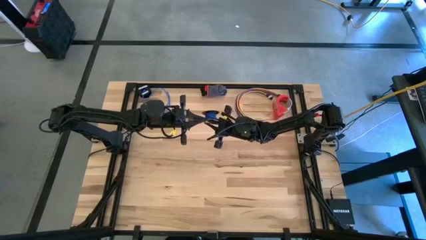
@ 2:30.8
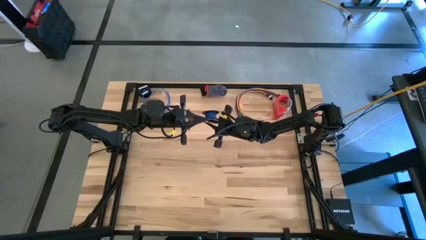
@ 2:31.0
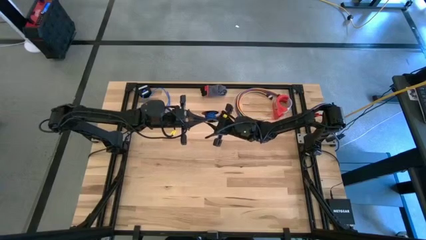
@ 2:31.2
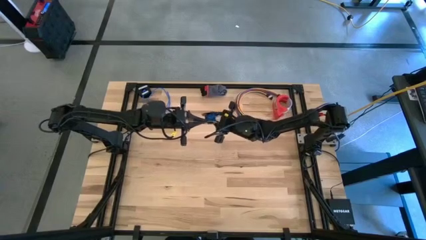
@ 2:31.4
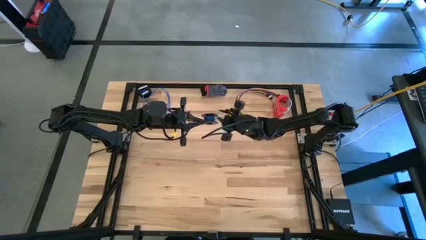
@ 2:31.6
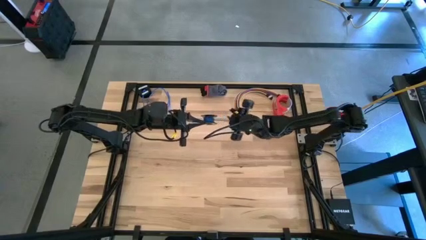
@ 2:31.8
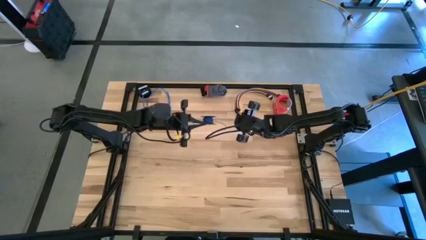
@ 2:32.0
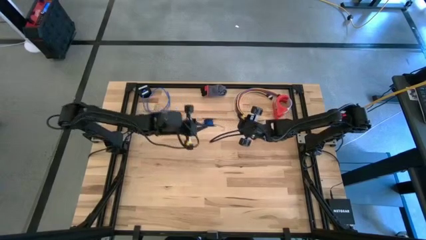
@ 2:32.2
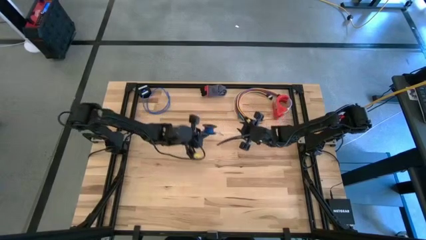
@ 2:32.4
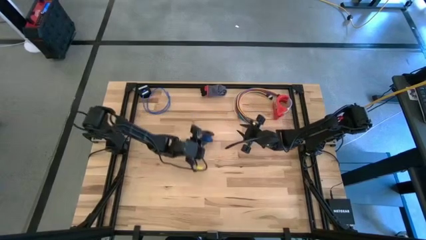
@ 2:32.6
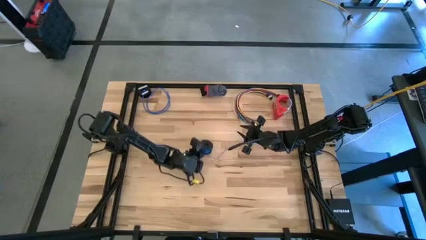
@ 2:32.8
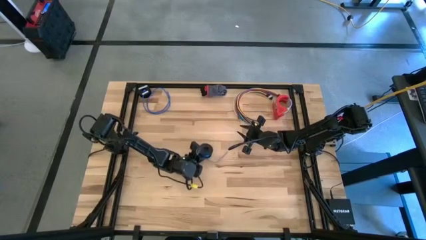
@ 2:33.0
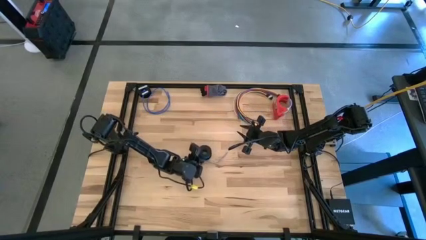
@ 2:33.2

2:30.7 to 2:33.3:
Task: Coil cords
Put the spool with the blue wire on the table

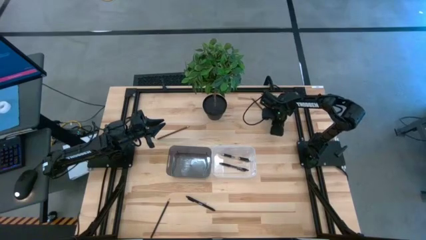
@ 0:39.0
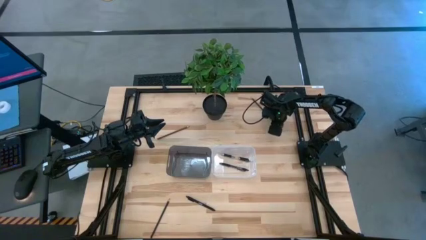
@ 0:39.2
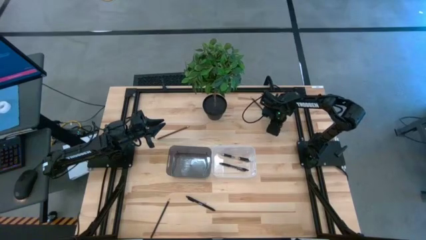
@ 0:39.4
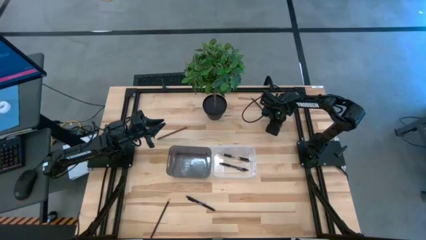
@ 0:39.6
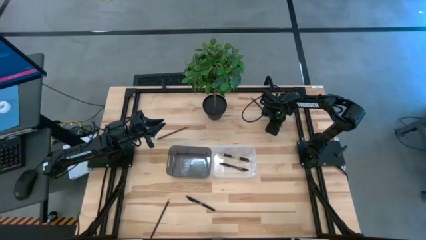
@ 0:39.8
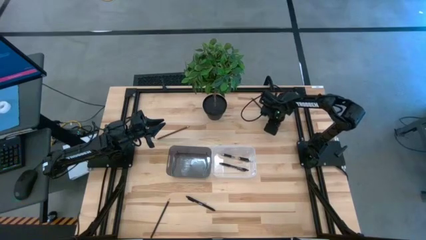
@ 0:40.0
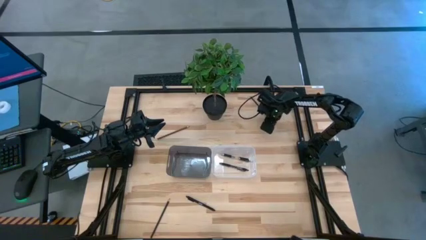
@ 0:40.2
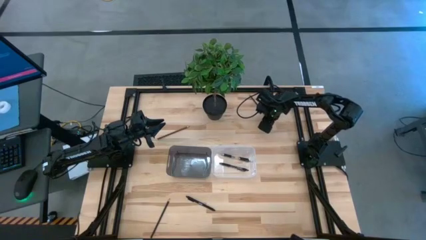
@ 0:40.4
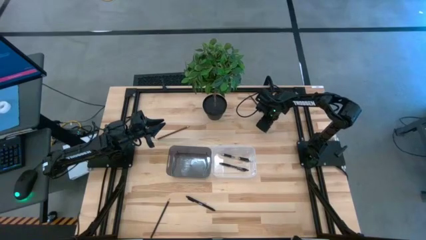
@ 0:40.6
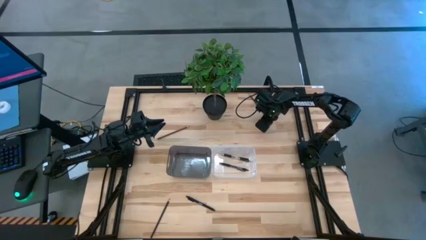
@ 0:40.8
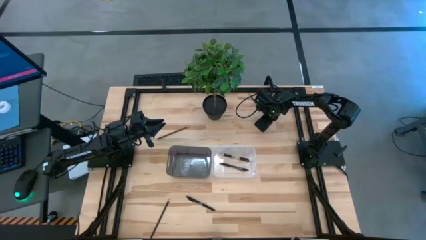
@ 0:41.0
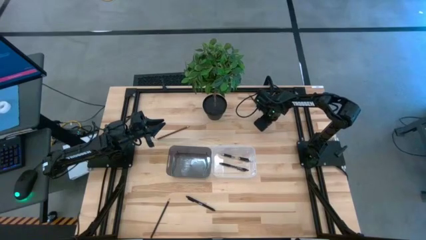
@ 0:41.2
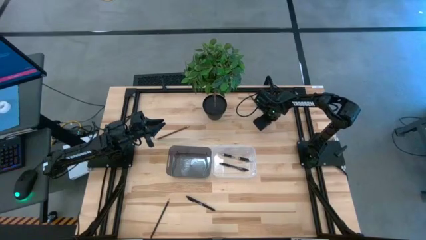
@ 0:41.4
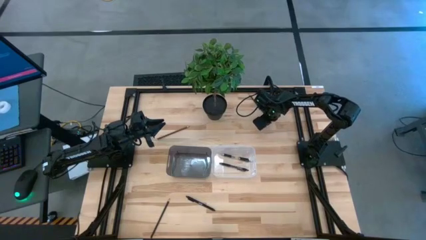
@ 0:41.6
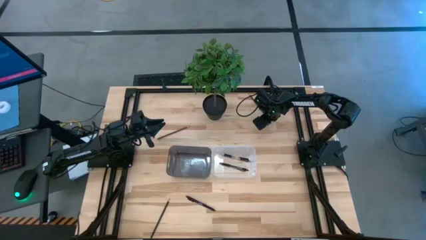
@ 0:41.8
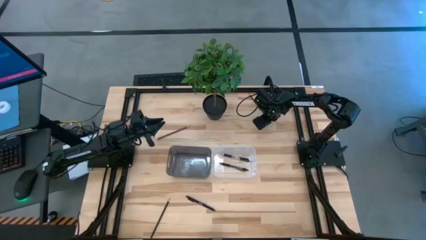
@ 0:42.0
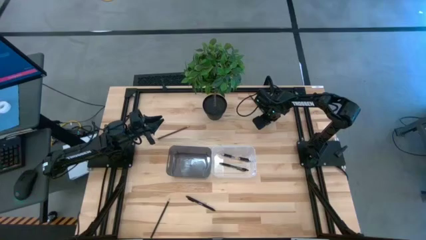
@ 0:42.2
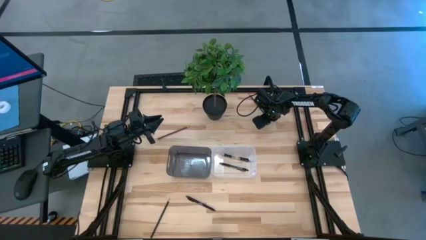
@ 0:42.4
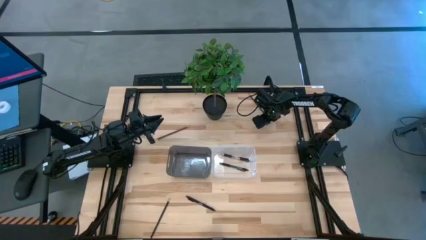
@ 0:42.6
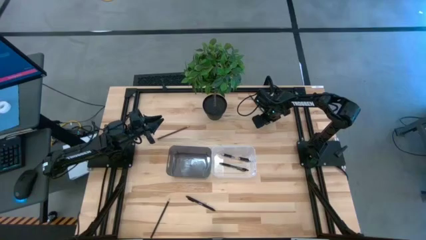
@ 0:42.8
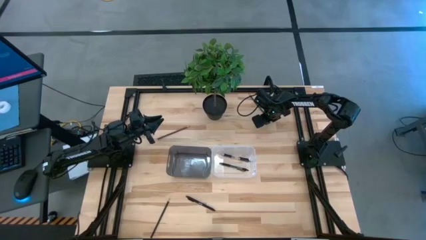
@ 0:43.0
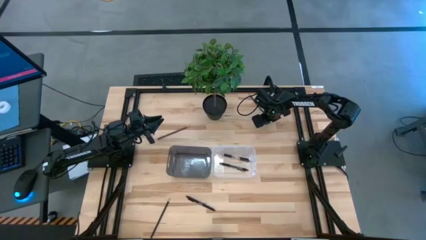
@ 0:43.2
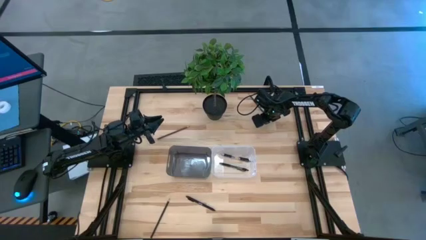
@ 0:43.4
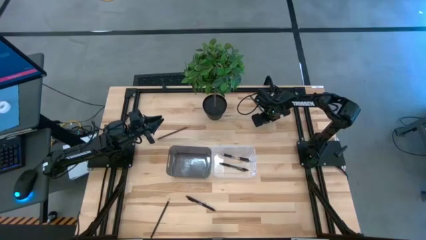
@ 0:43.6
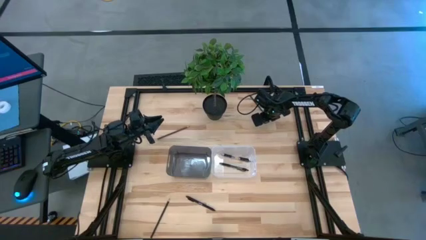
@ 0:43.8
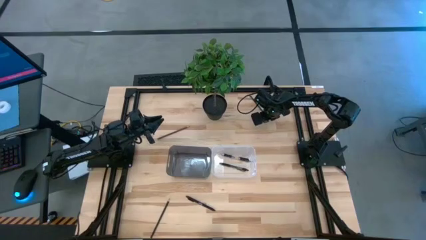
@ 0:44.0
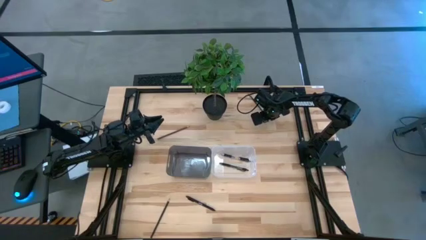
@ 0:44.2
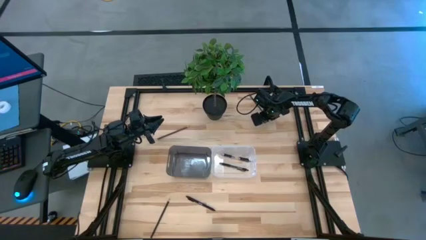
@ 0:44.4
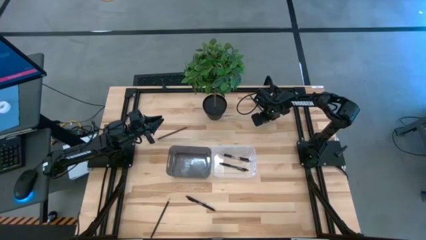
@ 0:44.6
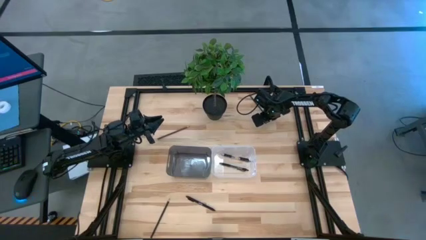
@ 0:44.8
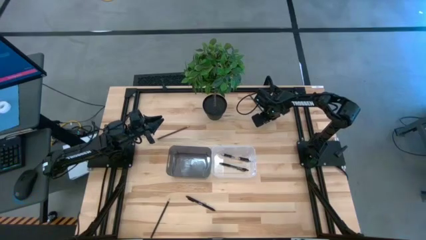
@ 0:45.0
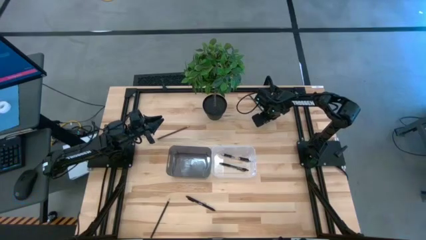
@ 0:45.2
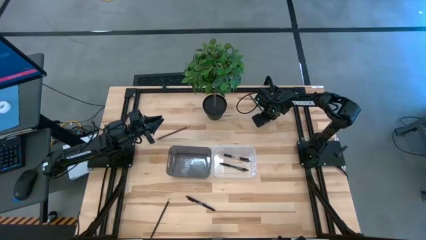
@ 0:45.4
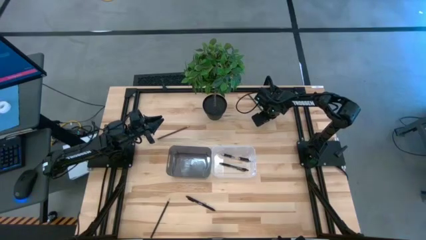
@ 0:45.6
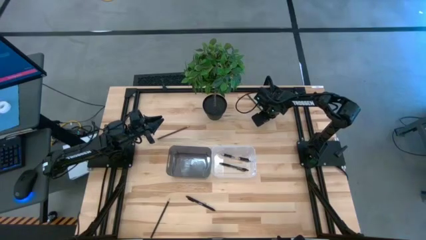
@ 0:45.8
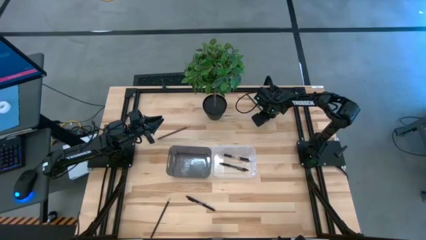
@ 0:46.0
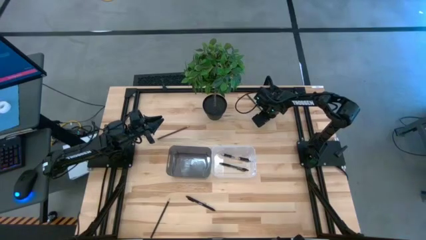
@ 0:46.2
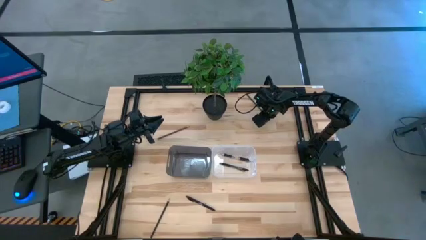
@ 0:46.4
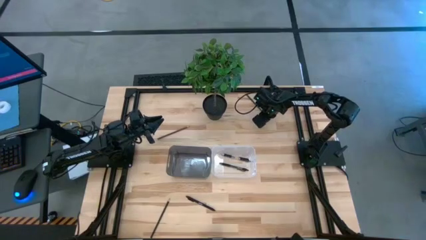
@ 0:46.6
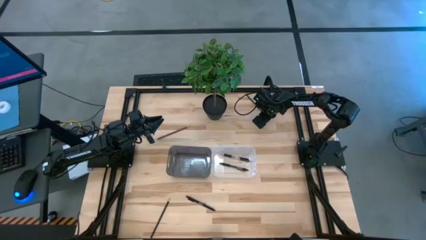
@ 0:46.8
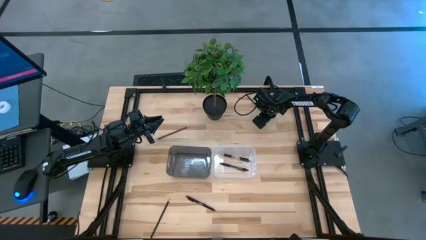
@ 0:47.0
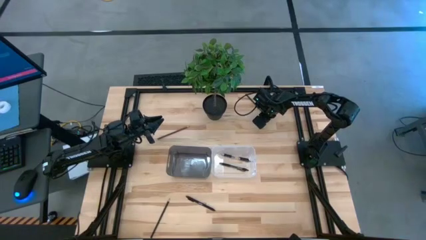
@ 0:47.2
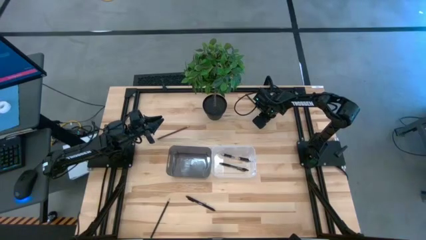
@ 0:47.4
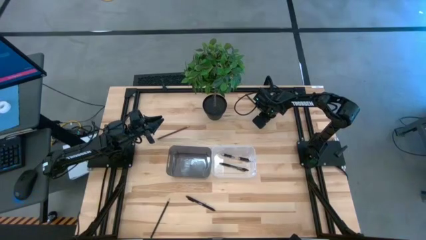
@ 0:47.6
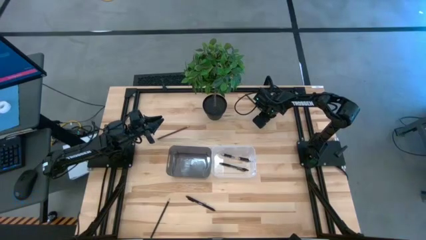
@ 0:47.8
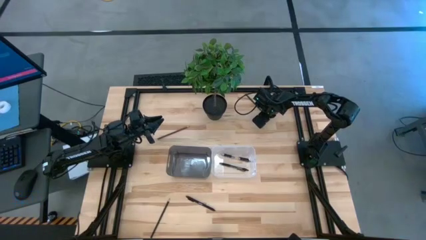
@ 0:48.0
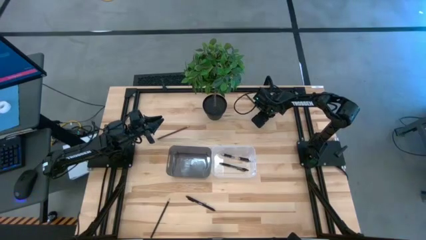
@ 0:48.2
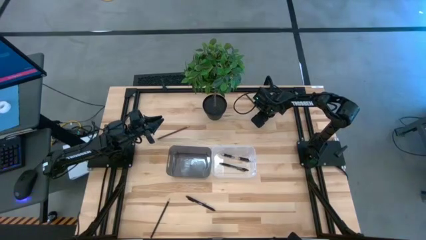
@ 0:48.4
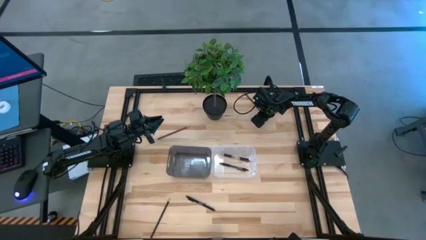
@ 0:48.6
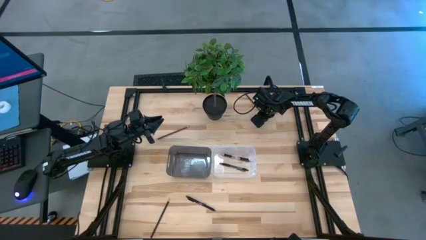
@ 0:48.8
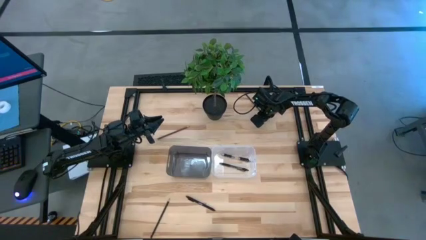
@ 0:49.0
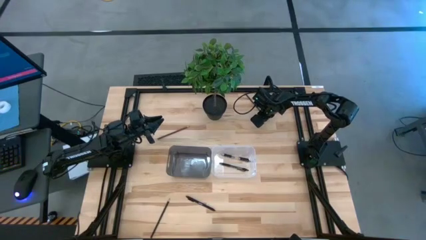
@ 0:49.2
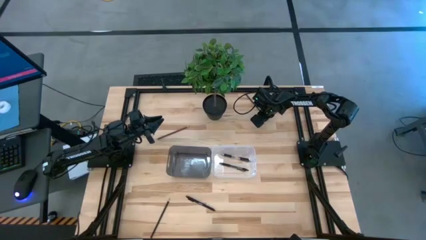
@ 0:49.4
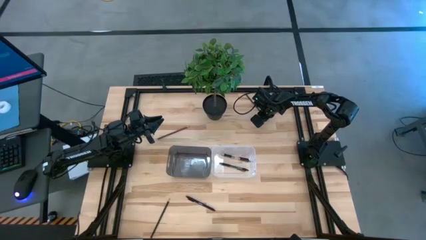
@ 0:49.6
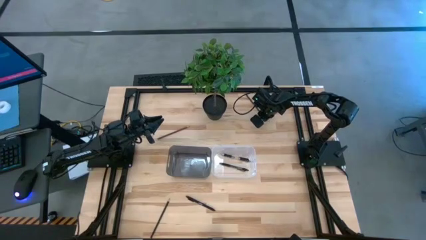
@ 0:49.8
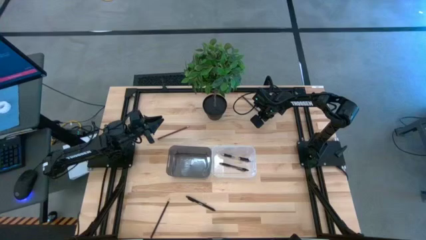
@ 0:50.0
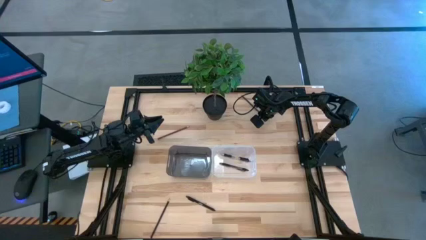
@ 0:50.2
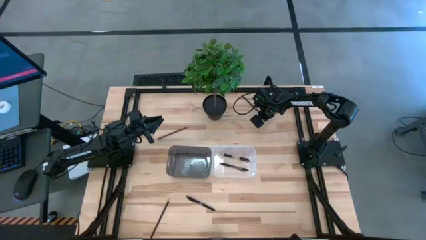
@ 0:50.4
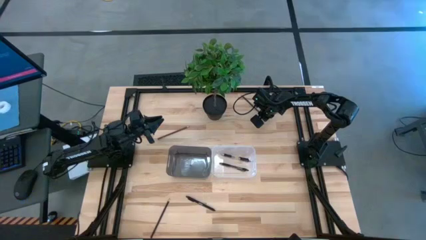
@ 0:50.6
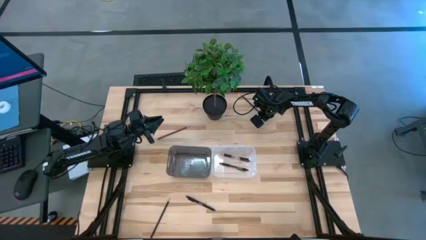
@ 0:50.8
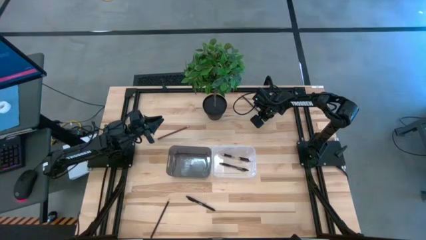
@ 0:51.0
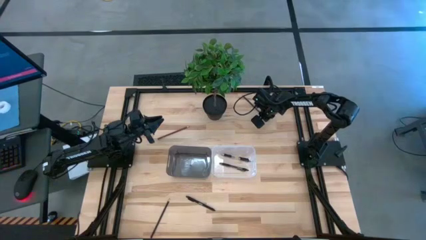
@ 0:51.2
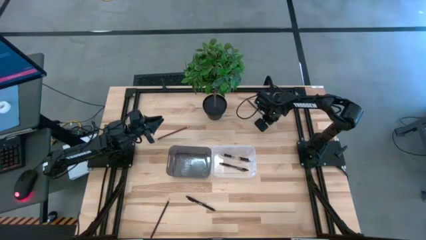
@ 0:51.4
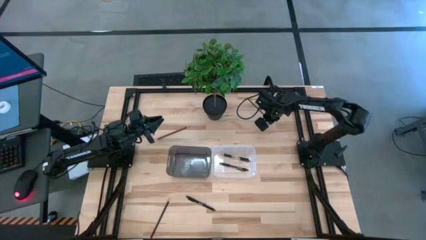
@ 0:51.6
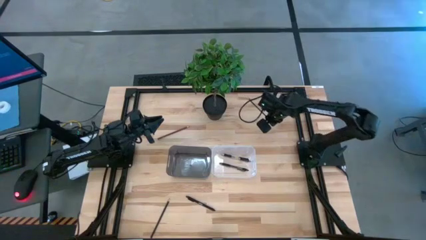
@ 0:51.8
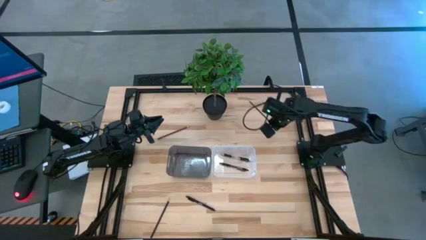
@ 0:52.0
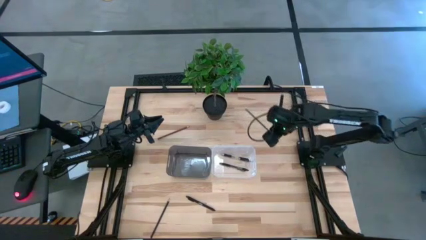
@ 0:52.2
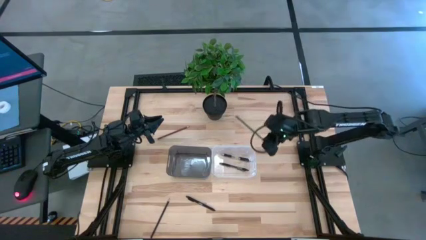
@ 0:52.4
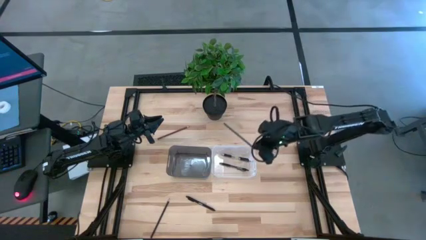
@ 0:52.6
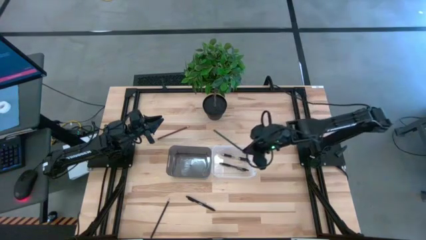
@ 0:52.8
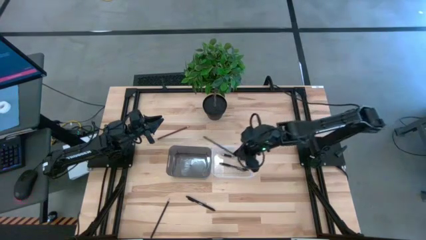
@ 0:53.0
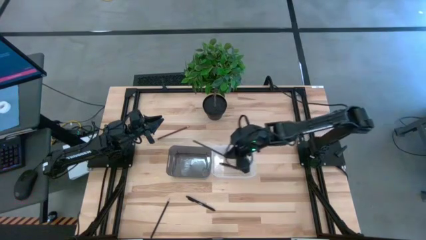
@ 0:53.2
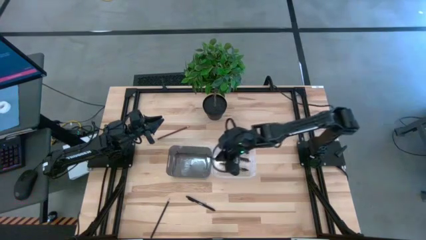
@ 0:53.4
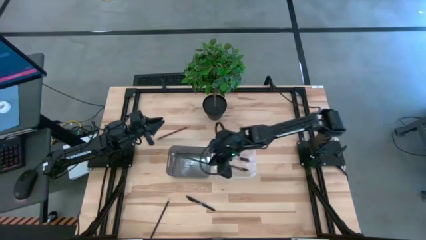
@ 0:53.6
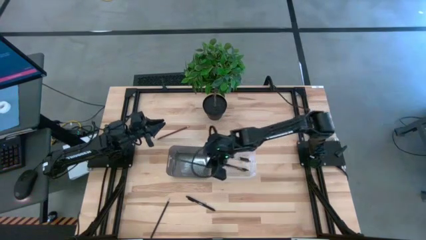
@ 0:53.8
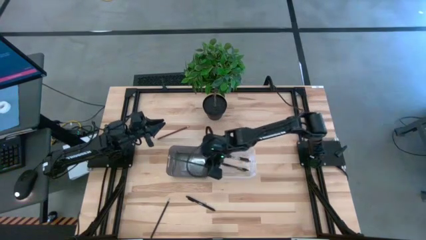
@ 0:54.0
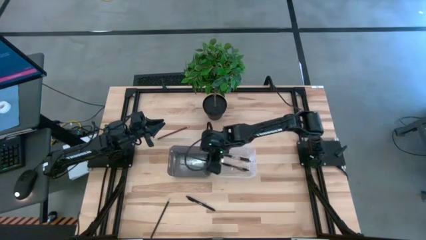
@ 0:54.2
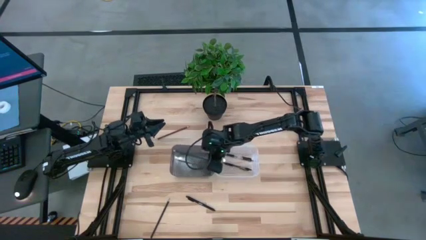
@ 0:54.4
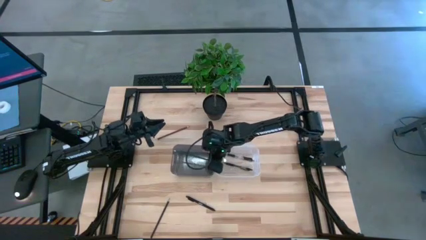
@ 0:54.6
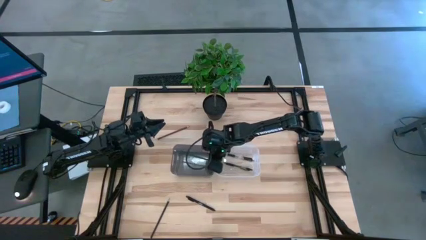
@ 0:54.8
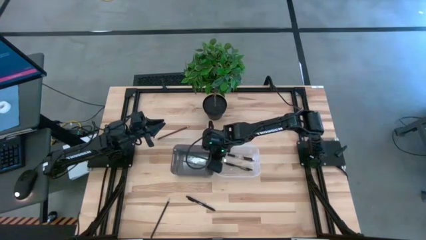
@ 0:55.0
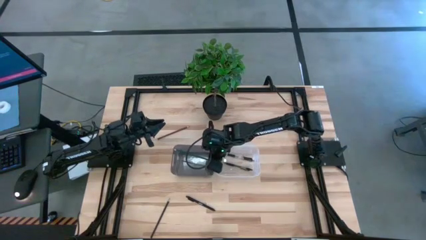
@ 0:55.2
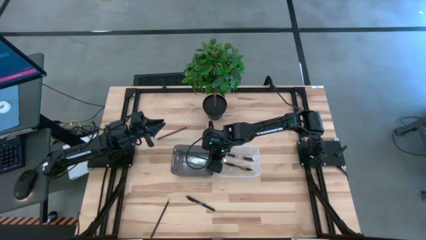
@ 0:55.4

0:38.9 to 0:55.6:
Task: Sort pens & pencils
Put the green pencil into the black bin
